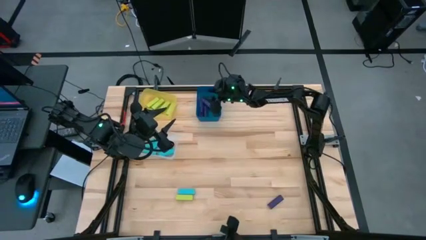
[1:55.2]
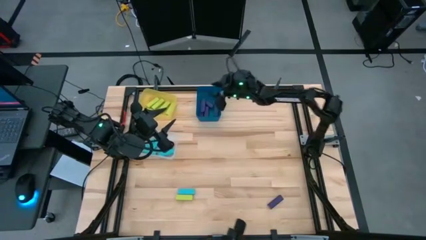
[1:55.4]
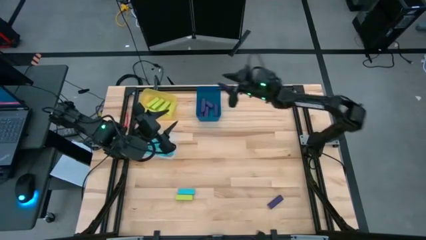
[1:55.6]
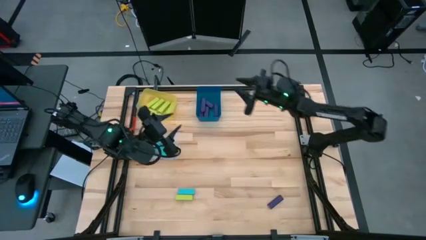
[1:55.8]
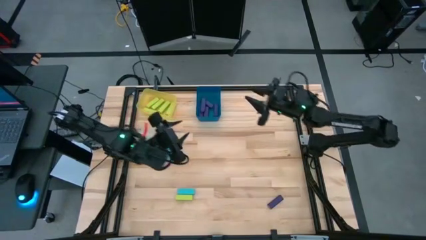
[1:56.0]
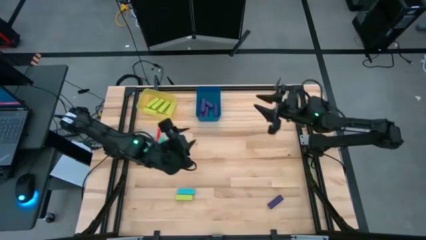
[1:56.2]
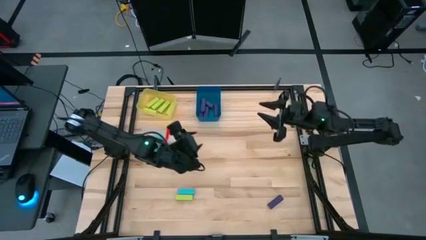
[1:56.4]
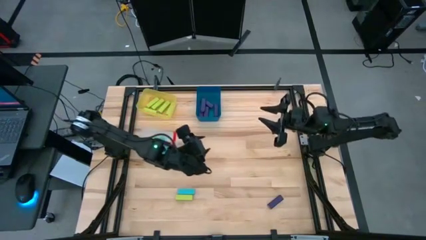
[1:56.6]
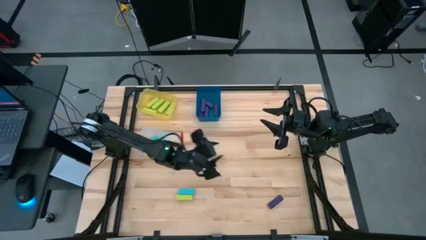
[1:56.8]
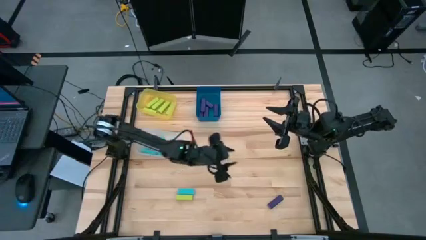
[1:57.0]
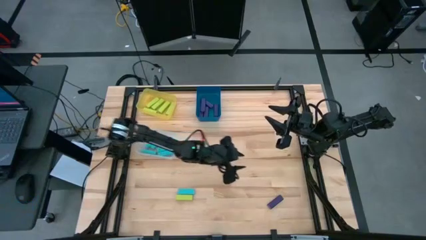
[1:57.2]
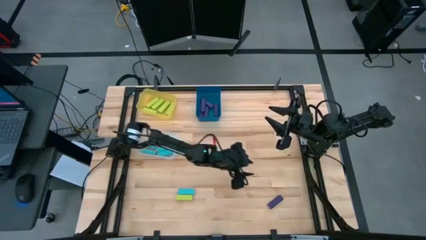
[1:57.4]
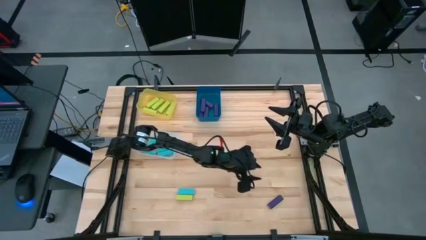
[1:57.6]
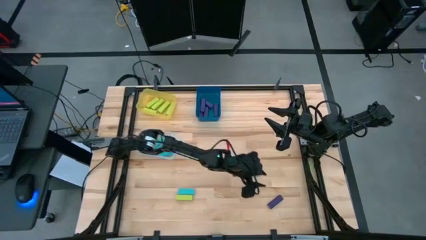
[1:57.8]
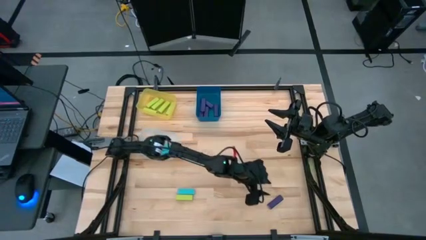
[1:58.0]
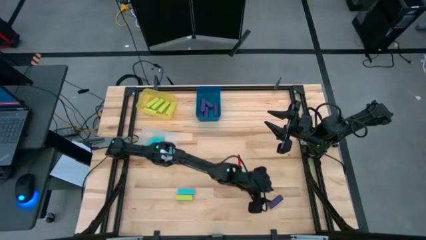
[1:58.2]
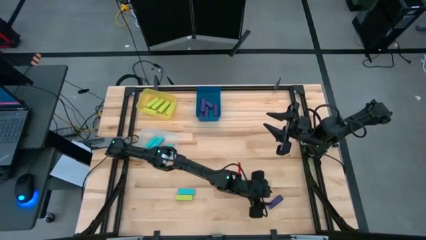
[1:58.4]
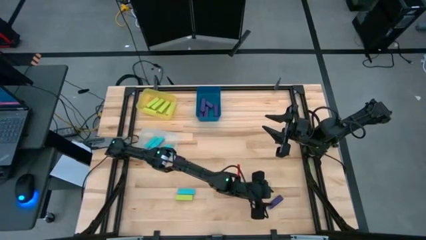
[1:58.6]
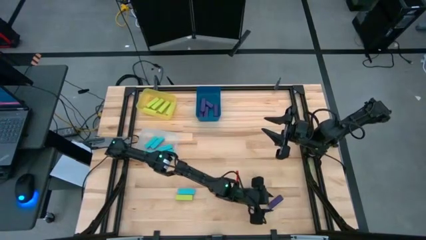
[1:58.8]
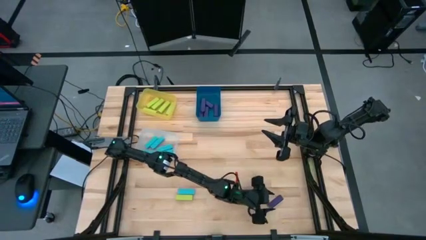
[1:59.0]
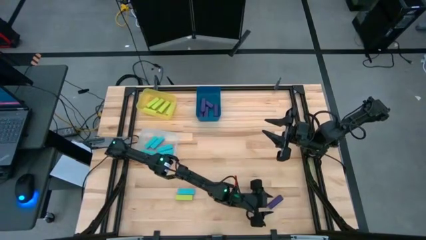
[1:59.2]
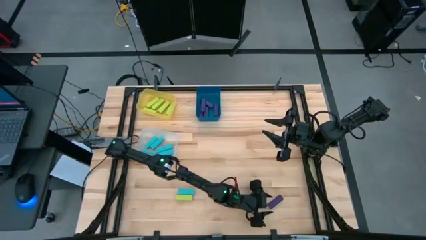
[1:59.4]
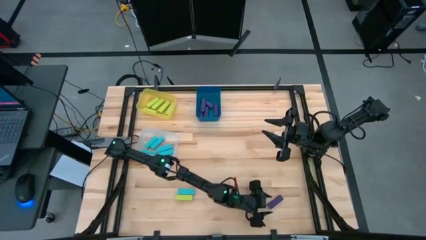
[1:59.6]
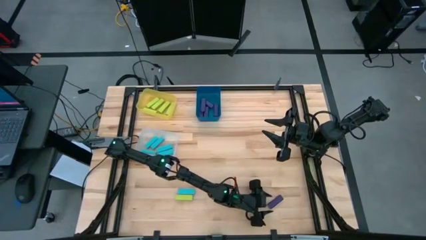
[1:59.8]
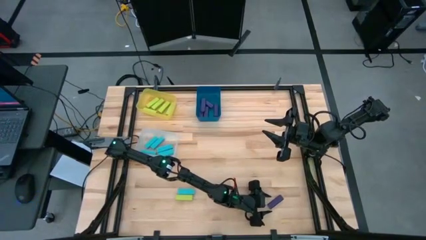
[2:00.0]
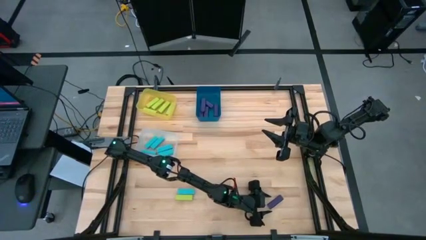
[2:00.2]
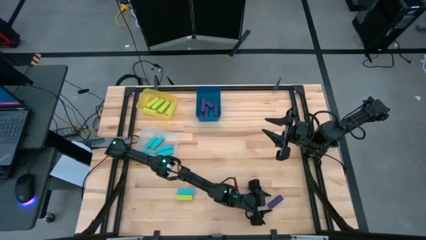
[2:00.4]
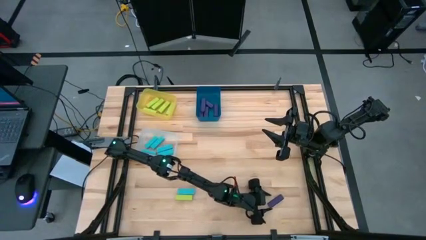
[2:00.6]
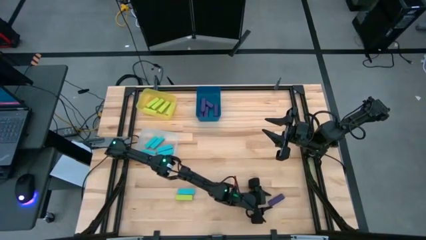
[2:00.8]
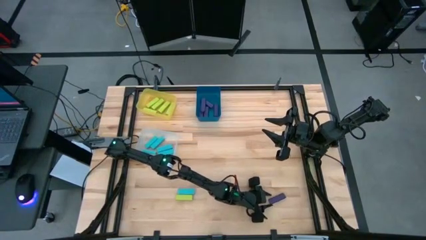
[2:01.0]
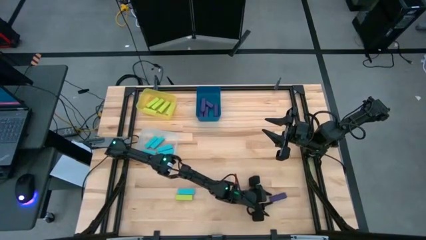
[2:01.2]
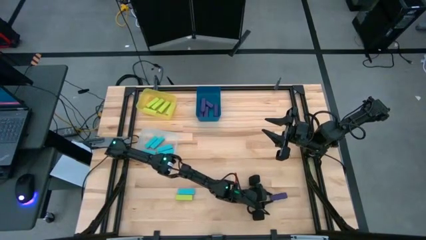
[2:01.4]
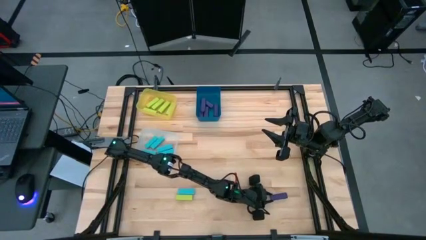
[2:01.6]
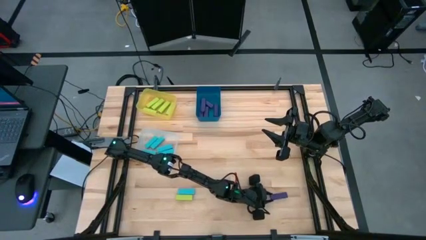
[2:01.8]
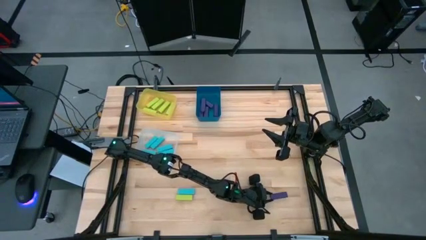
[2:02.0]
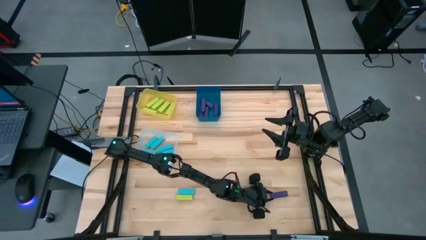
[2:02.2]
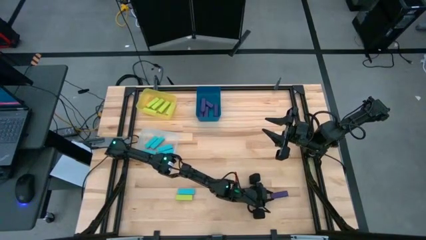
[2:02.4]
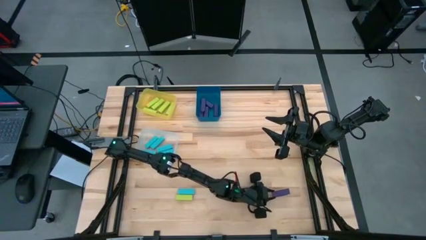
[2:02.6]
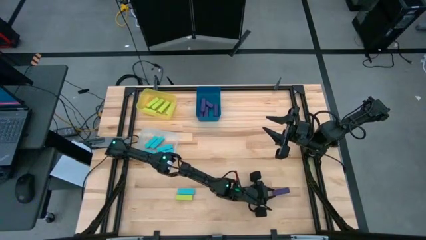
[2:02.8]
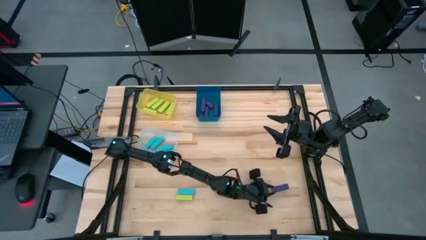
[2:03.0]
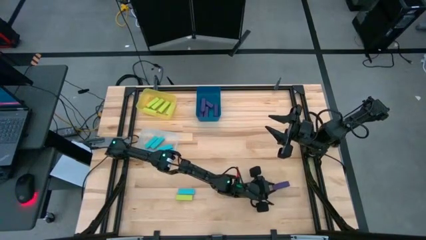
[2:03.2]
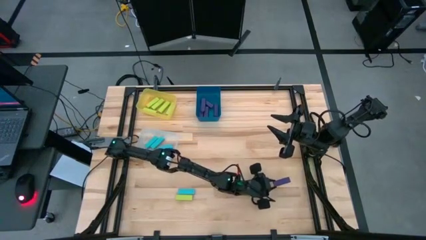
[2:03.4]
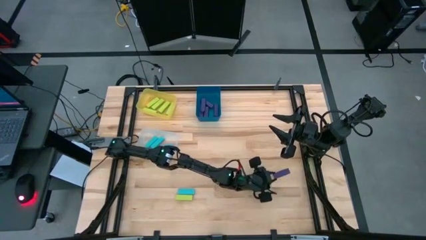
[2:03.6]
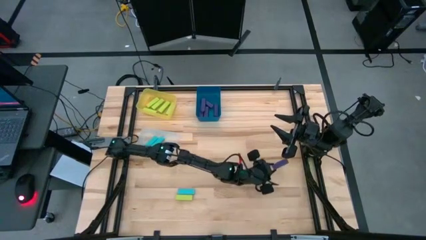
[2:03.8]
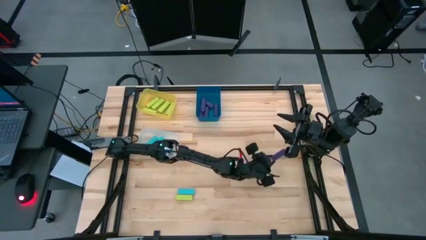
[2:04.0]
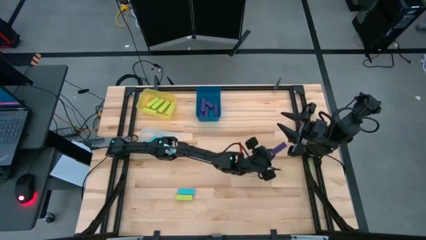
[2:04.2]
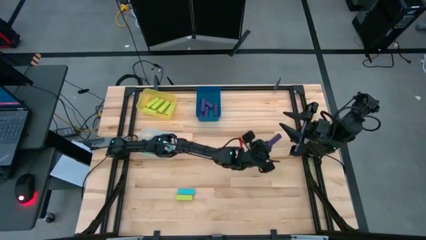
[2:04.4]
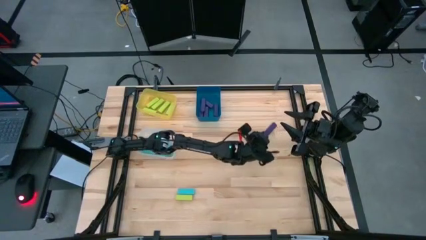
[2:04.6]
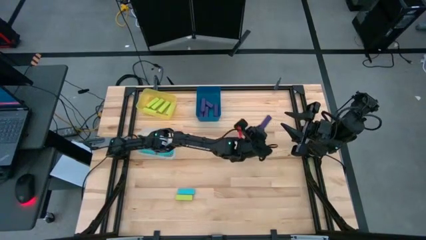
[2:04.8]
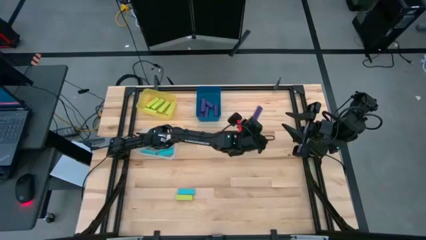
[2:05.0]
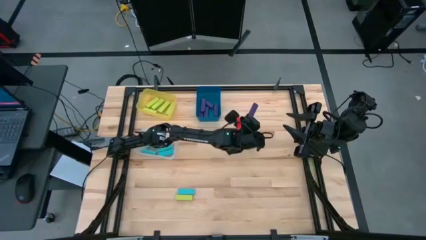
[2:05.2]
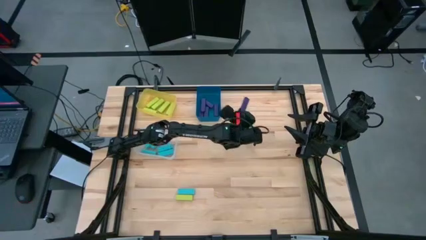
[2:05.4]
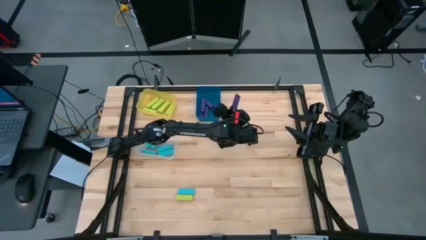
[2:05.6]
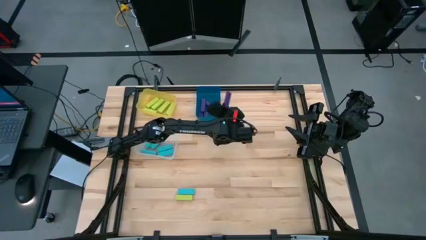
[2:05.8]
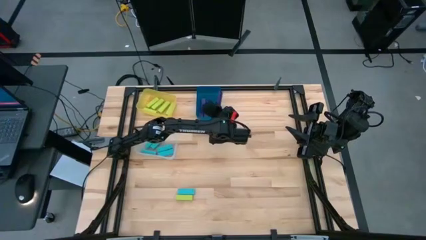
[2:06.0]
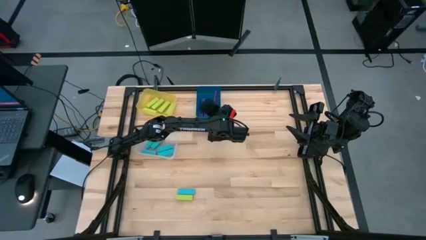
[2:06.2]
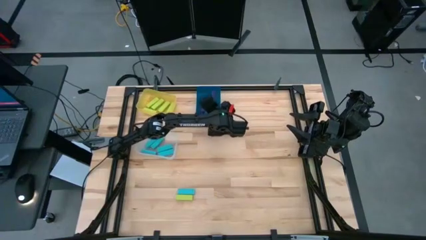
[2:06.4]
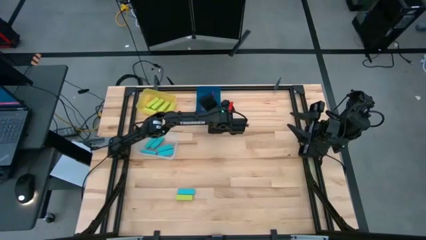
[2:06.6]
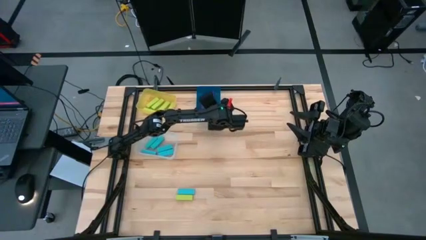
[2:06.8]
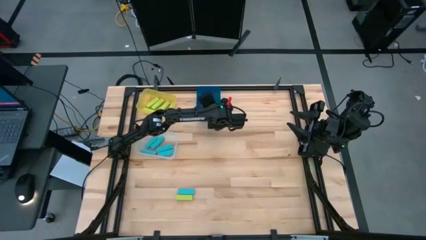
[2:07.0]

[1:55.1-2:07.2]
Task: Sort blocks
Put the purple block into the blue bin

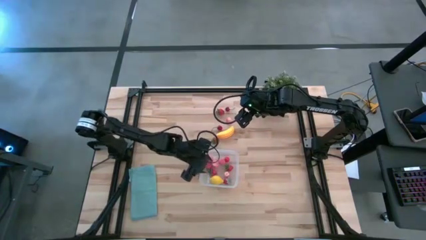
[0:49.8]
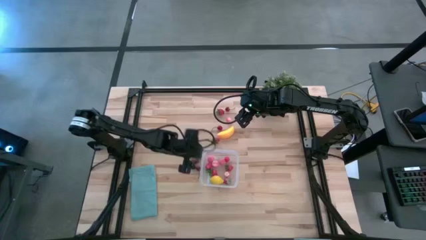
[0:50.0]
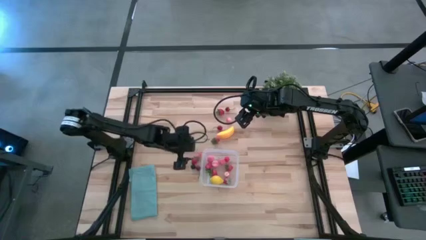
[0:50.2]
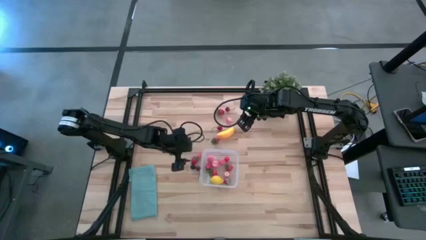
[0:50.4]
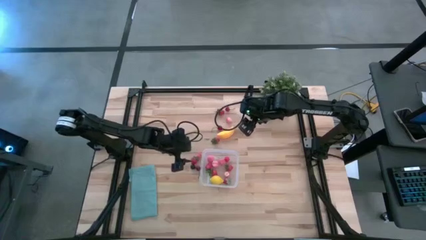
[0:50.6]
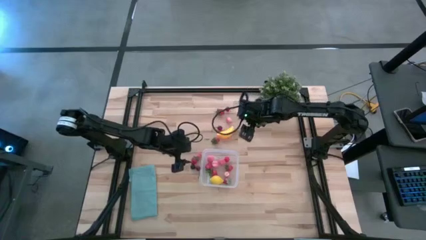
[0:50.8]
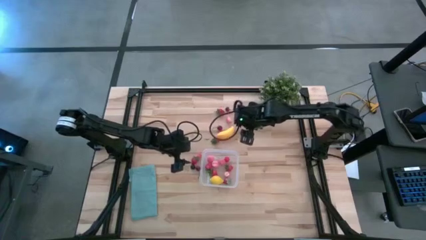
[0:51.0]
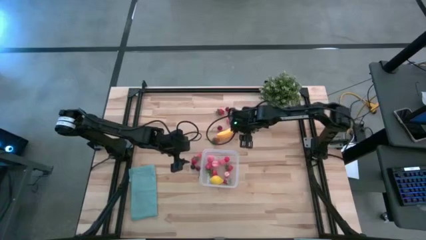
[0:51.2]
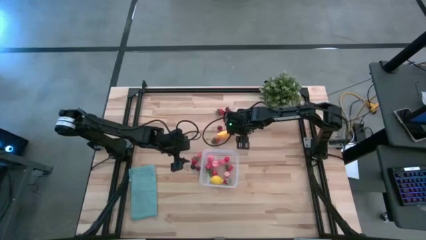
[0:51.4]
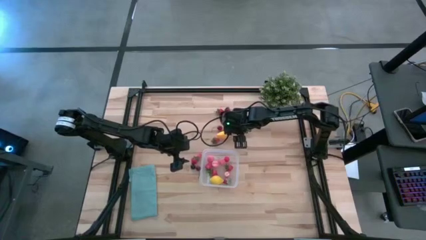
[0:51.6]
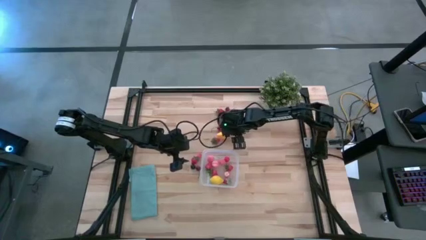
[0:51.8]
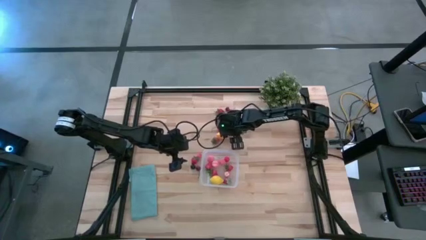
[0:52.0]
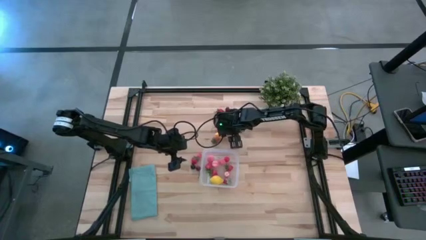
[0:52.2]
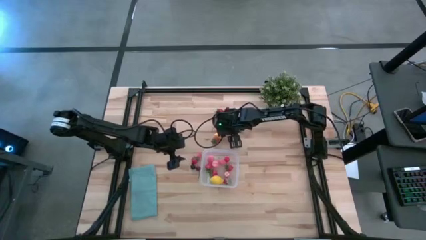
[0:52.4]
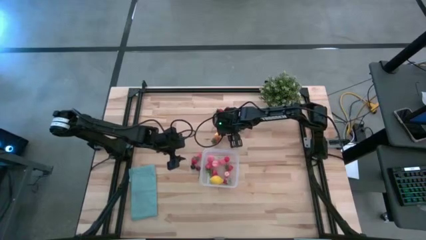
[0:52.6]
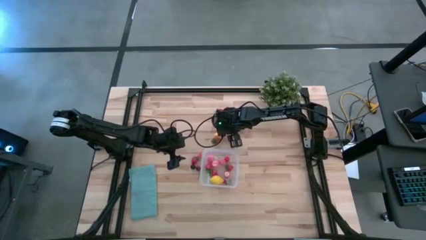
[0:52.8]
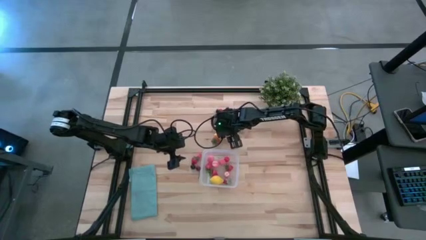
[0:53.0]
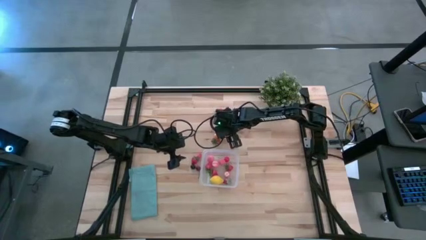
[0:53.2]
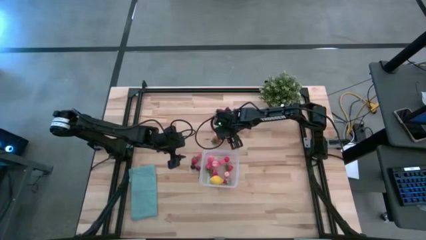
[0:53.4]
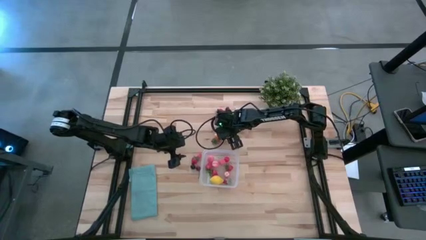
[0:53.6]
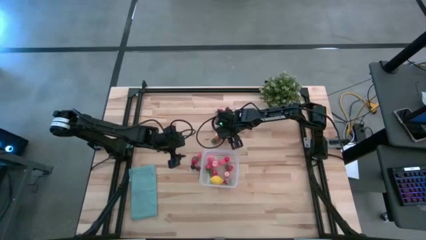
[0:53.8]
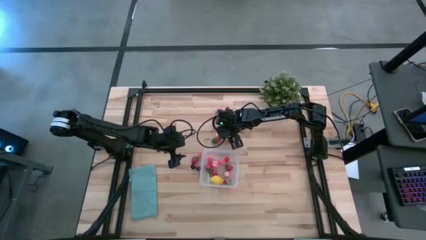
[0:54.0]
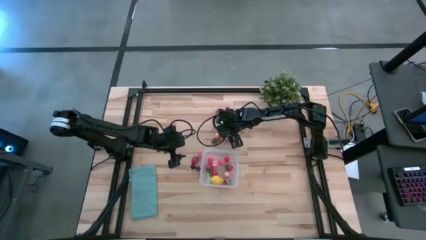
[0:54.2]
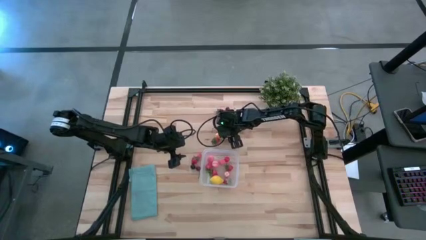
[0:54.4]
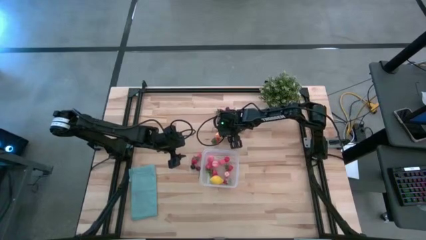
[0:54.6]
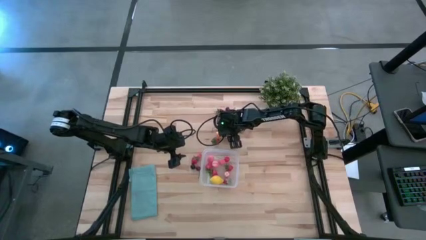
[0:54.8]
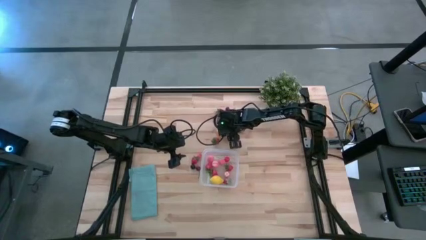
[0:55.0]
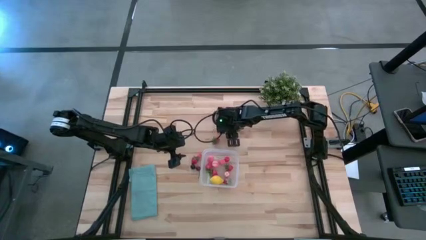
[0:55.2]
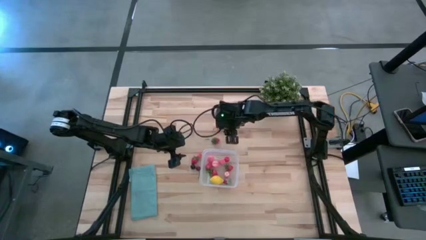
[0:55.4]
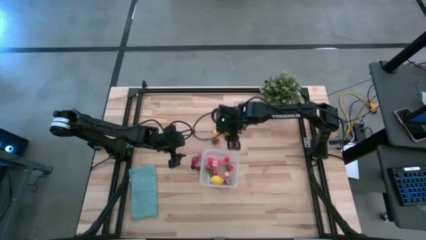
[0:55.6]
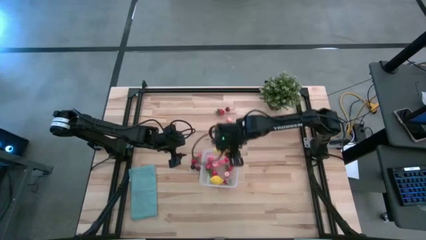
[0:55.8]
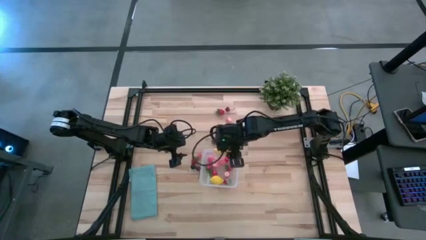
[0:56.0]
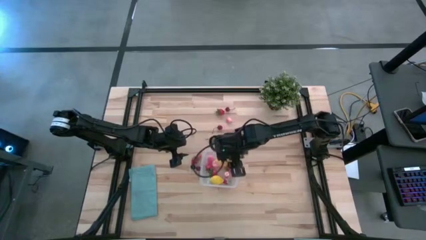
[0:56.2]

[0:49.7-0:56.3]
Task: Pick and placing Produce into tupperware
Put the yellow banana into the transparent container
